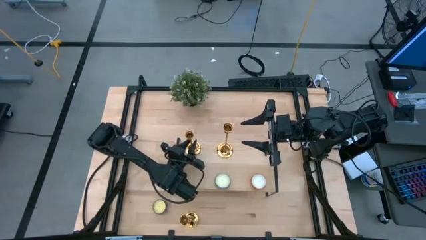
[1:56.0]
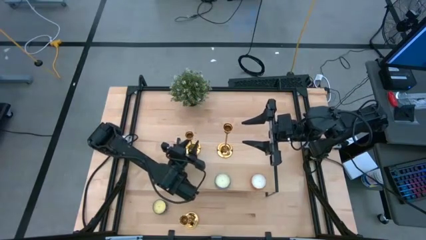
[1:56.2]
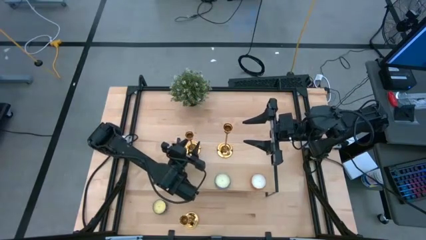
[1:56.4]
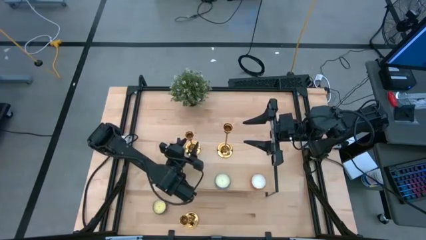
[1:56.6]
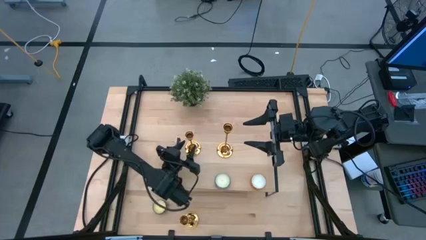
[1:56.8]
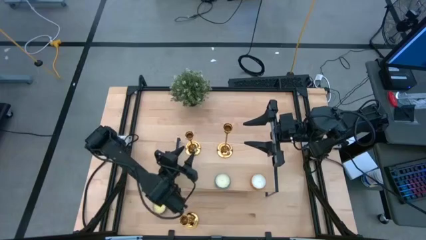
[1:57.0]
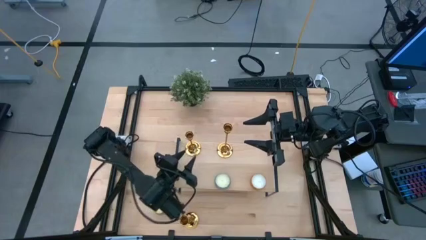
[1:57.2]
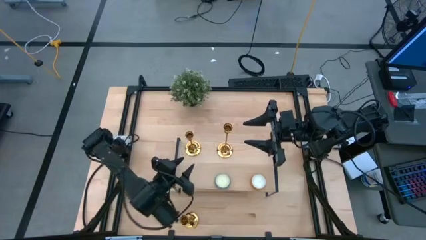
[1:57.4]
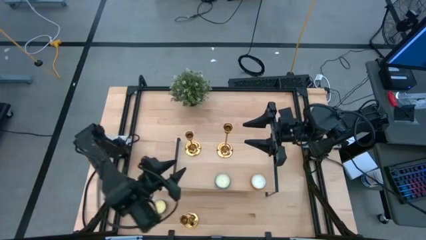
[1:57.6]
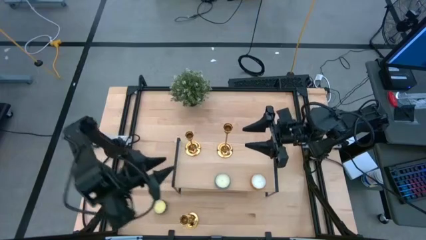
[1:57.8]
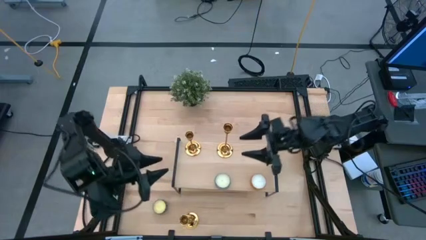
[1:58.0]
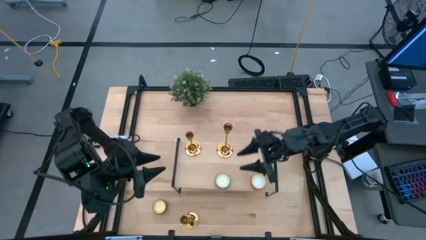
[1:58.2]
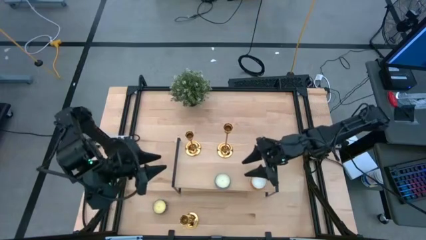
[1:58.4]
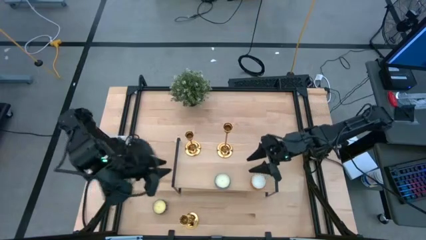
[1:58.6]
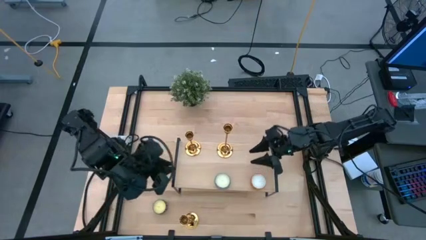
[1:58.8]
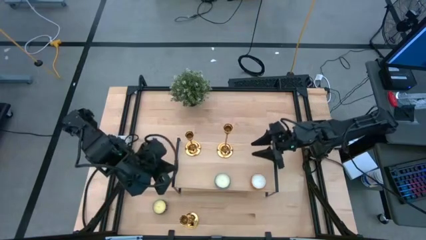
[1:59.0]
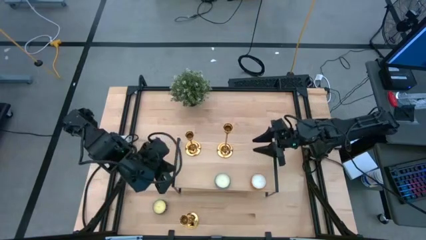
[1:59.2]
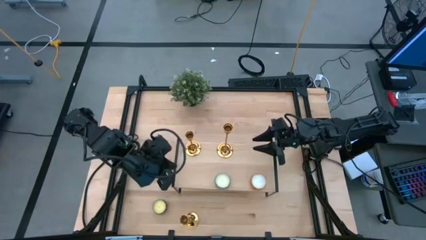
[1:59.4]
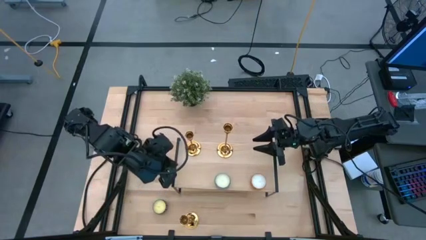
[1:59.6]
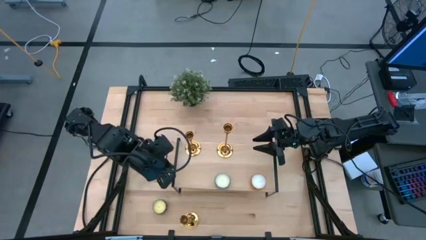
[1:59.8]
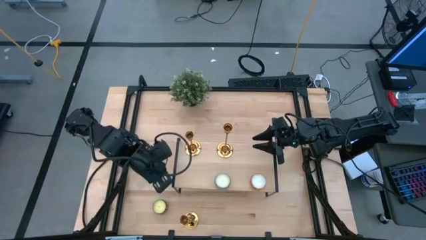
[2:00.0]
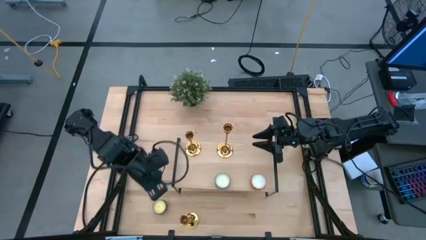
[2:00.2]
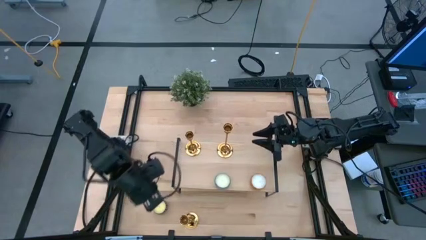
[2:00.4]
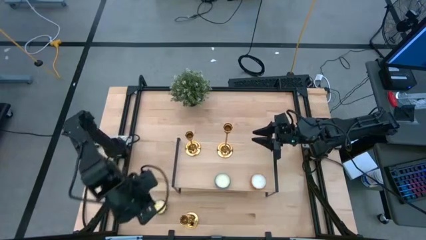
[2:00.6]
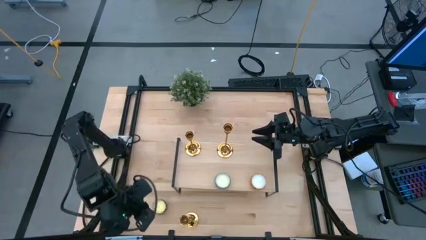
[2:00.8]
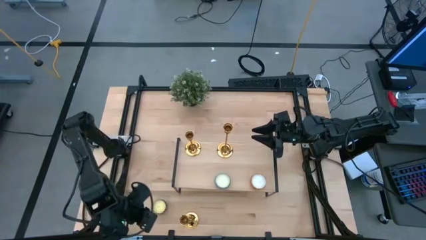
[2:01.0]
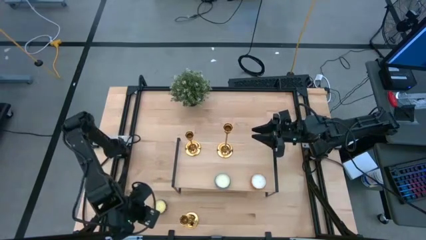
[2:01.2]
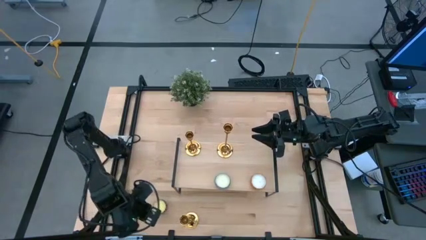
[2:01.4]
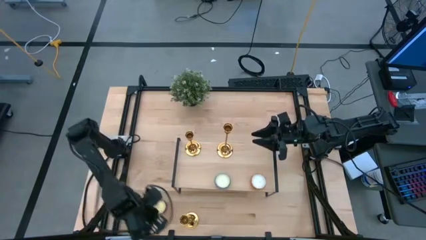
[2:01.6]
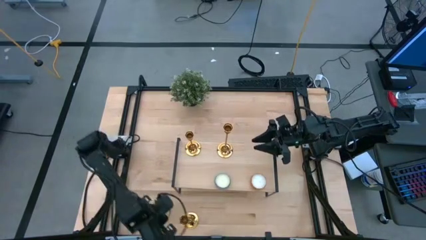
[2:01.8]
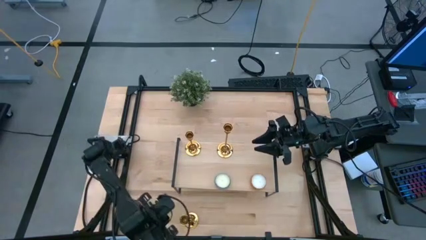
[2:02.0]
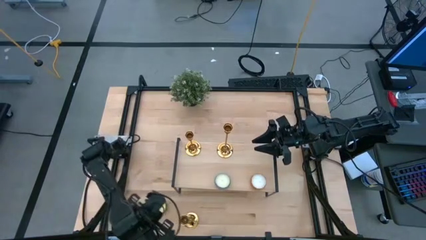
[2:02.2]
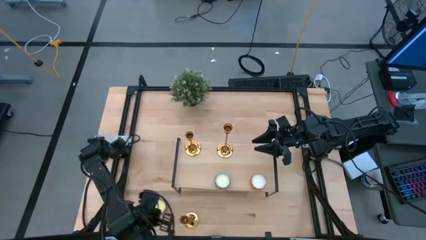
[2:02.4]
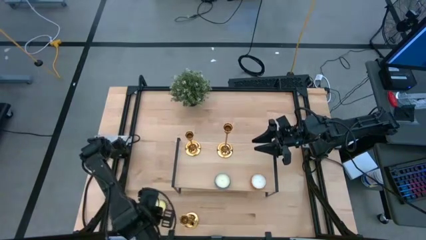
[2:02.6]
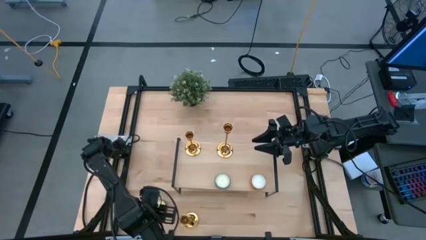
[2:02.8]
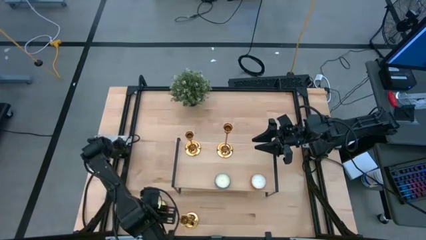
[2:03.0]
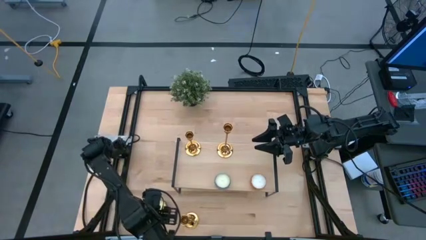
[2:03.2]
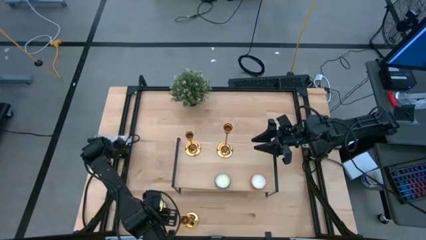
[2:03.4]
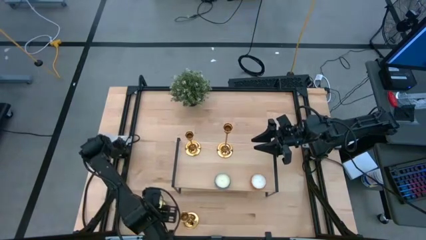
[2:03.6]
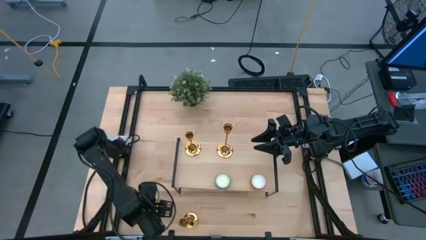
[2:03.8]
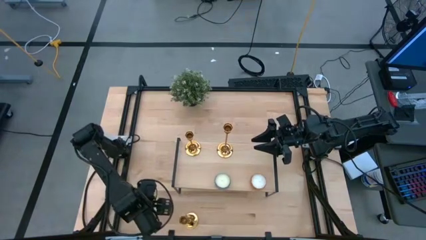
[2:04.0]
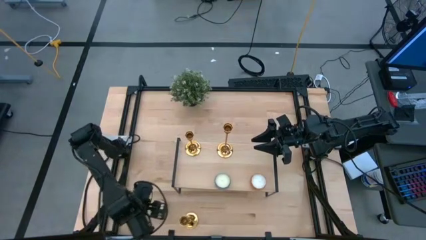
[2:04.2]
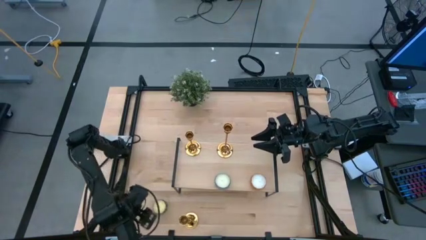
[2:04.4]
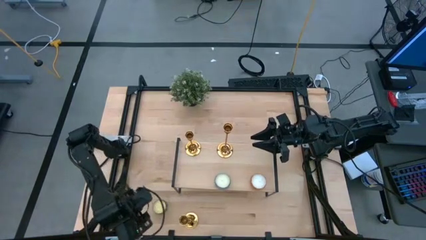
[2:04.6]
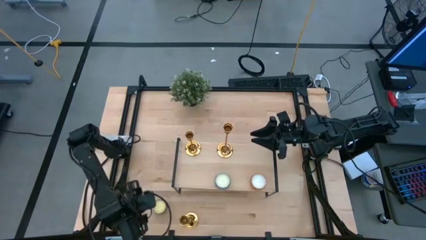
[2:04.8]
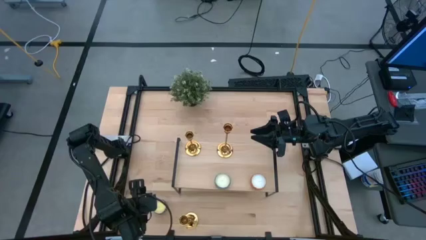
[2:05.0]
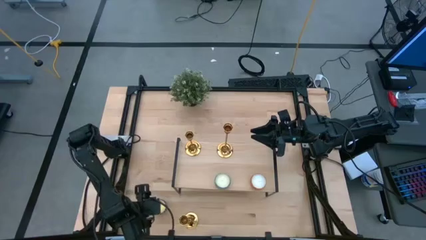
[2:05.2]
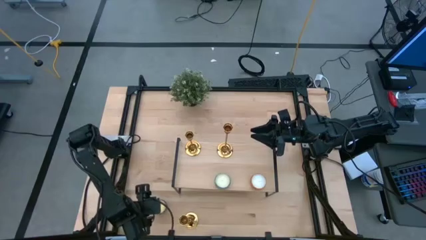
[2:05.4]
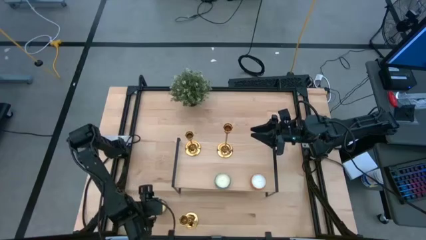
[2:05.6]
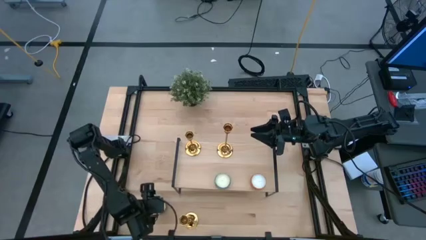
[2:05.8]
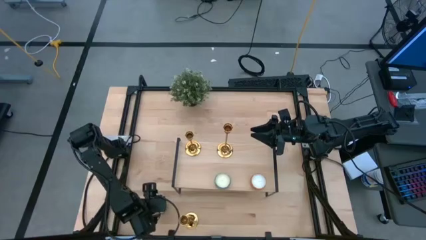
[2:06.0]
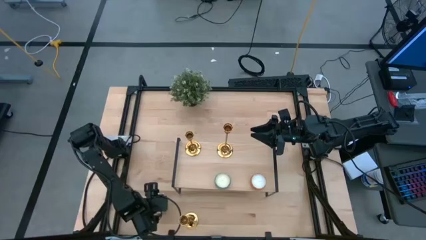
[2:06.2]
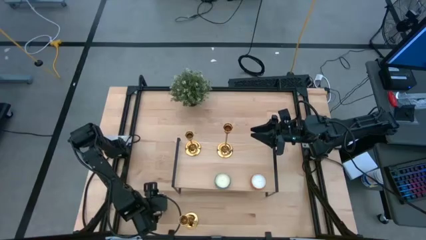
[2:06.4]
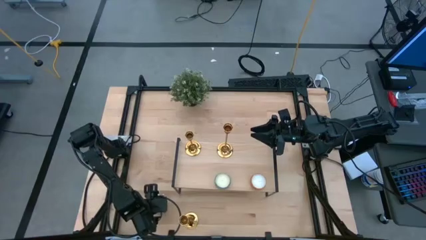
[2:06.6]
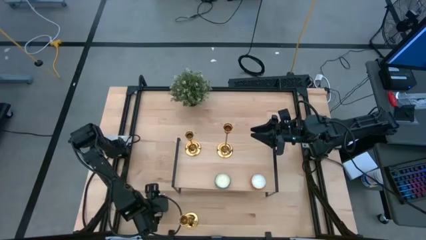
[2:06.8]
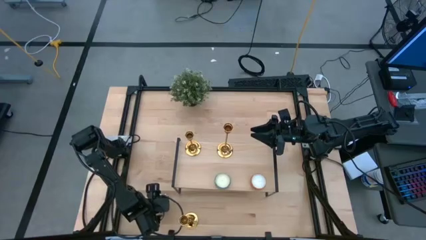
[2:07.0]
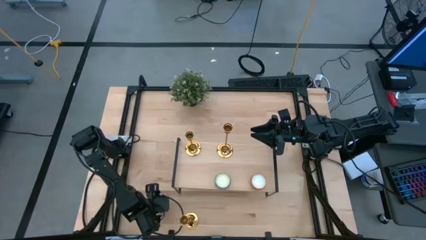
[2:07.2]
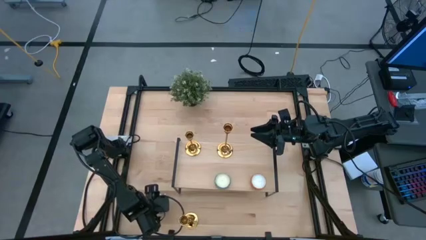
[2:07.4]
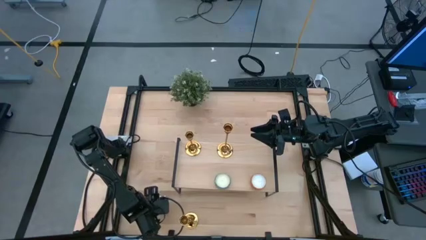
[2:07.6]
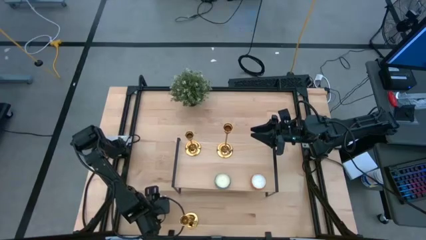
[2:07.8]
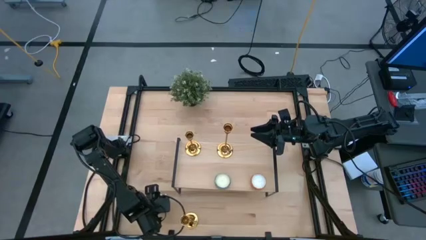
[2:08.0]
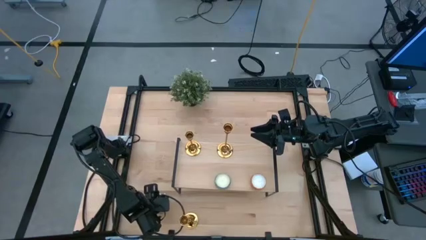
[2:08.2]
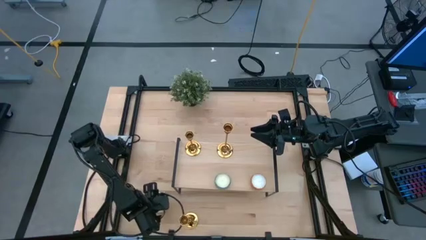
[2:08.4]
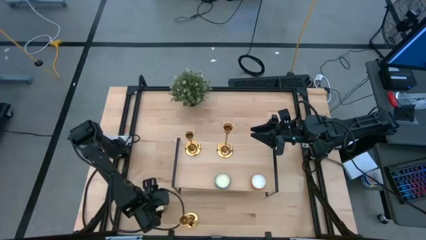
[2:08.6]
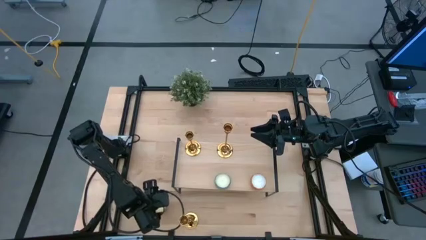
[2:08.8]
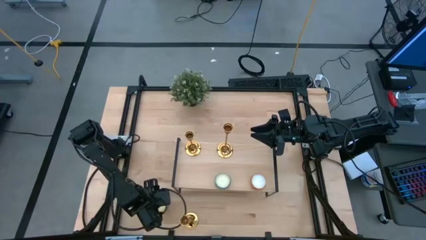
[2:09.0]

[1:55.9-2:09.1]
Task: Pick & Place candle stick holders
Put the red scented candle on the shelf aligned with the blue scented candle

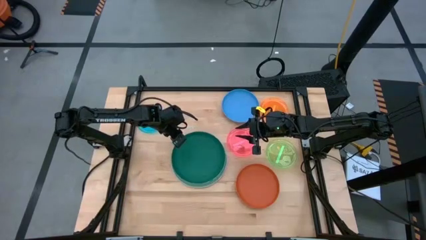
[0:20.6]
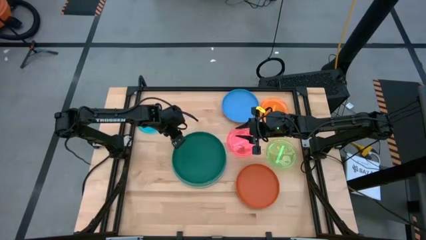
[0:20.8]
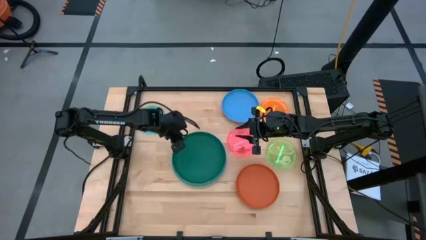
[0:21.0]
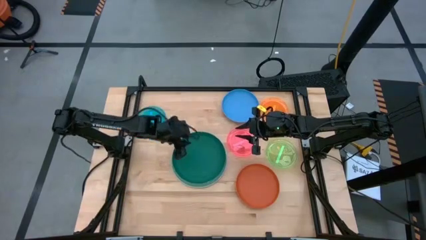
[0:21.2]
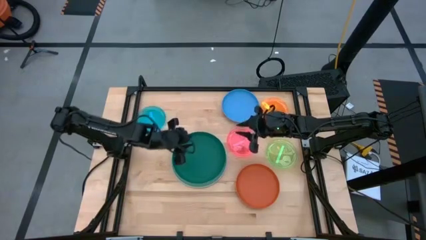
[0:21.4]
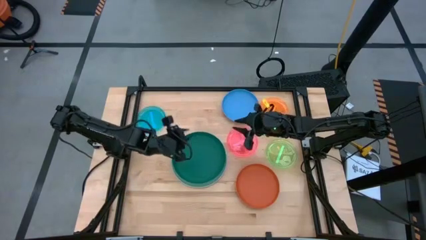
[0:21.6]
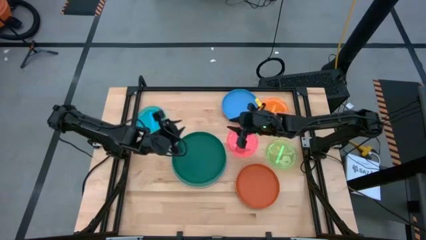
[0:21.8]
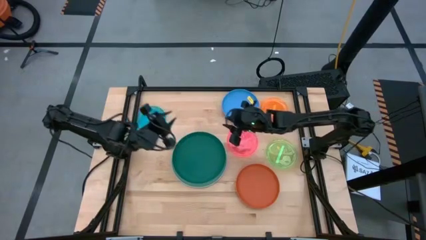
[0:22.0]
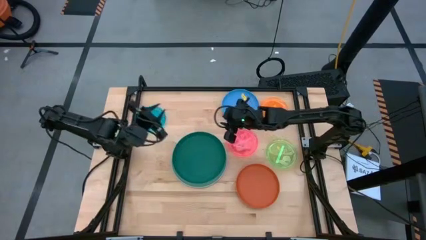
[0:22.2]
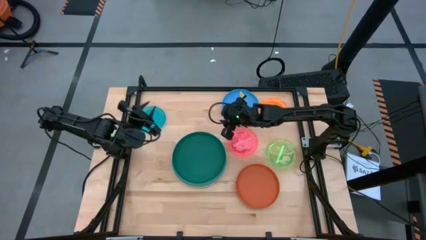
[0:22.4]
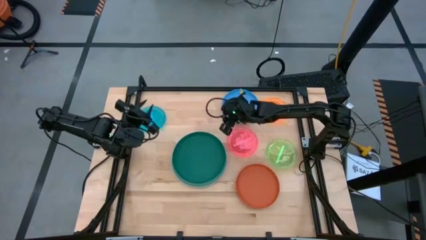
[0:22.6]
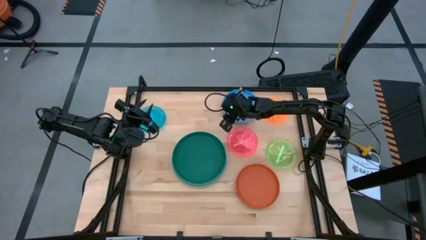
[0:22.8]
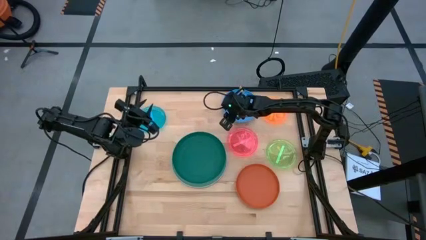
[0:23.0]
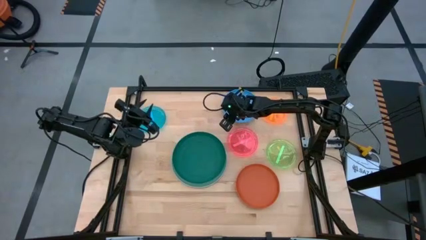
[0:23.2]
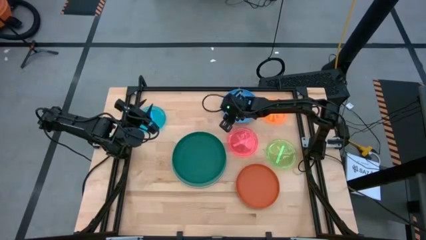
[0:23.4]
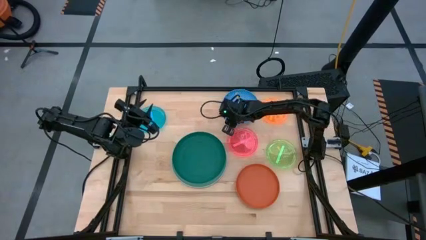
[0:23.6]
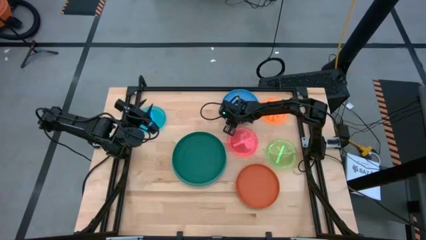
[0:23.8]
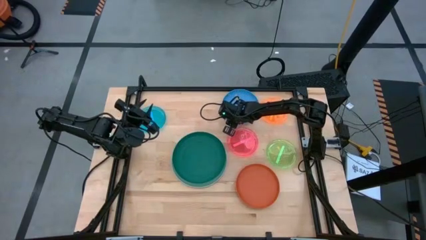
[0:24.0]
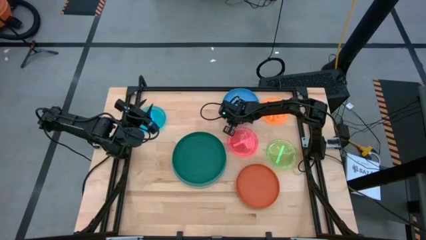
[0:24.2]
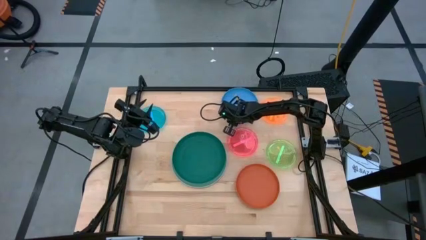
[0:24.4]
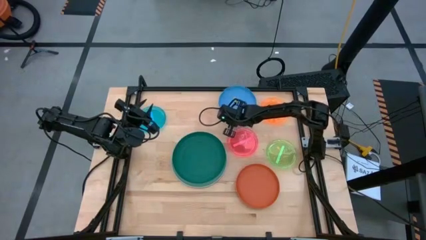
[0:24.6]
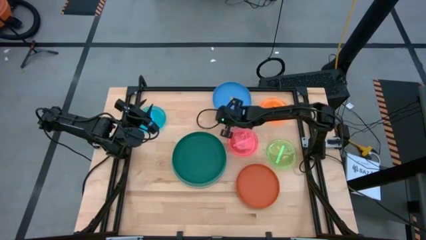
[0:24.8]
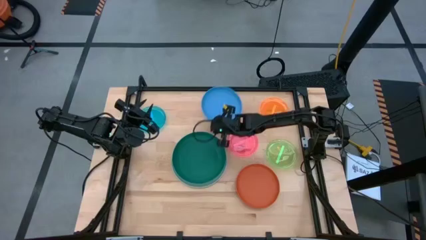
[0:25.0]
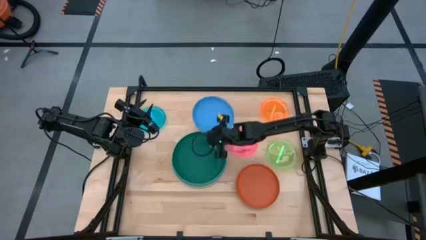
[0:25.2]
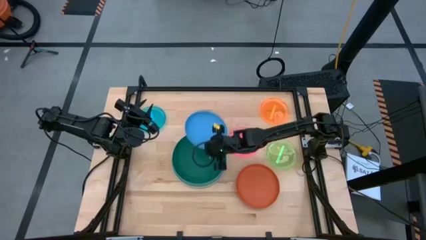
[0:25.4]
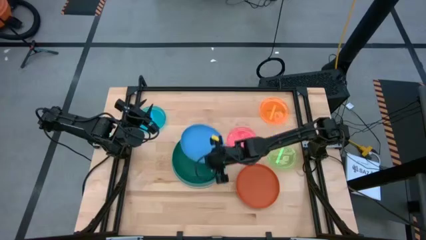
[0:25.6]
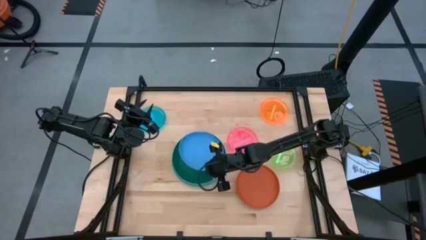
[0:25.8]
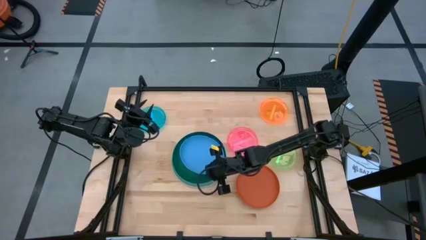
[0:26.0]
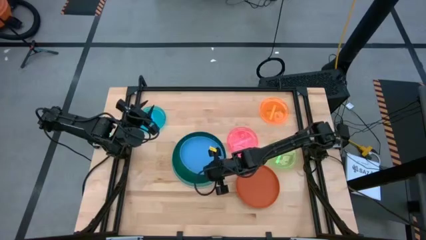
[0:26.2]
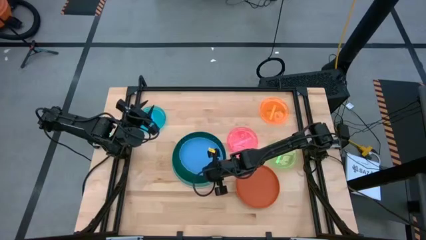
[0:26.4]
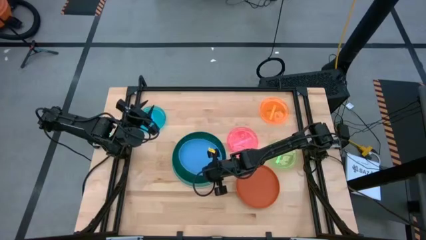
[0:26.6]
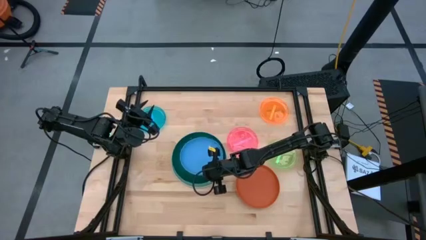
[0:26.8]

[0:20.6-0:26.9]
Task: Stack plastic plates
Stack the dark blue plate on top of the dark green plate
